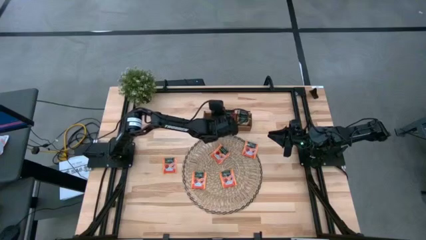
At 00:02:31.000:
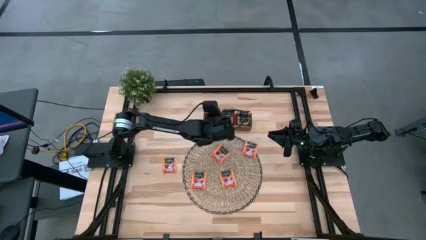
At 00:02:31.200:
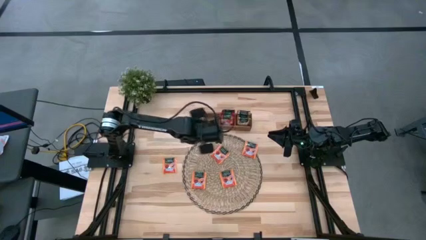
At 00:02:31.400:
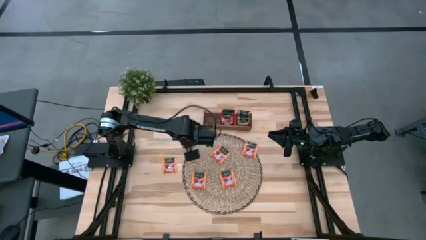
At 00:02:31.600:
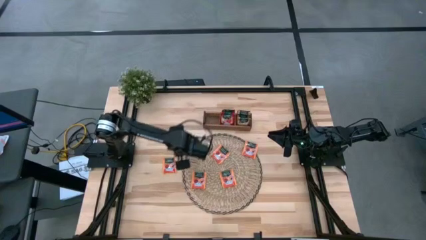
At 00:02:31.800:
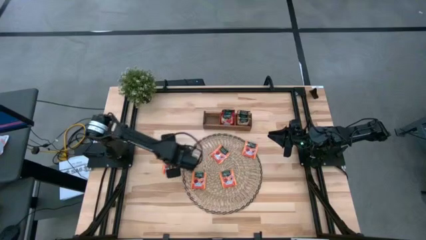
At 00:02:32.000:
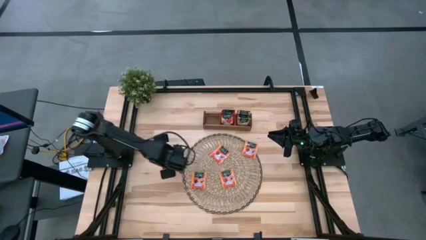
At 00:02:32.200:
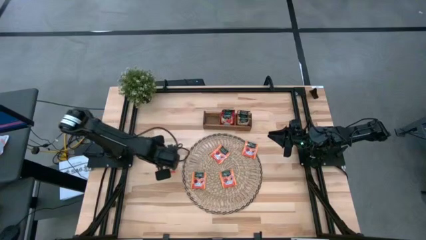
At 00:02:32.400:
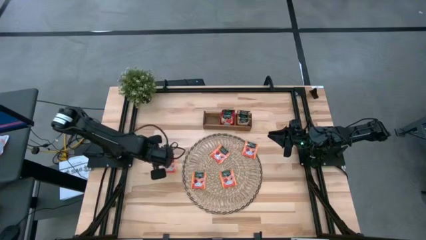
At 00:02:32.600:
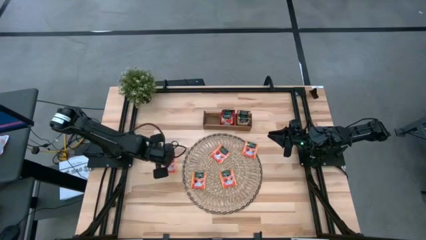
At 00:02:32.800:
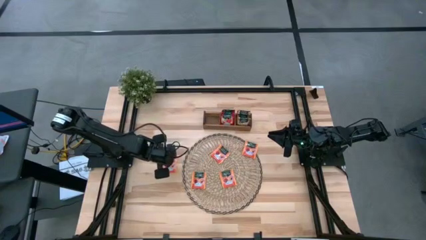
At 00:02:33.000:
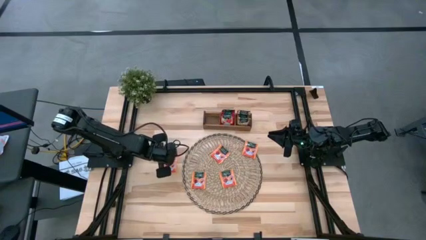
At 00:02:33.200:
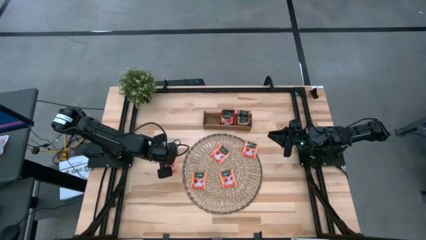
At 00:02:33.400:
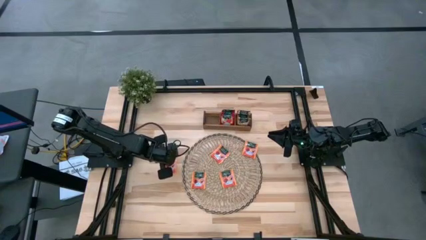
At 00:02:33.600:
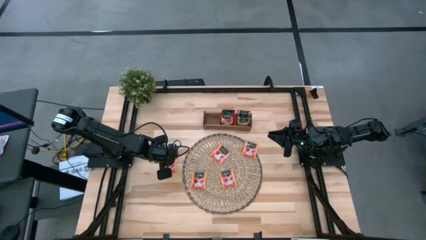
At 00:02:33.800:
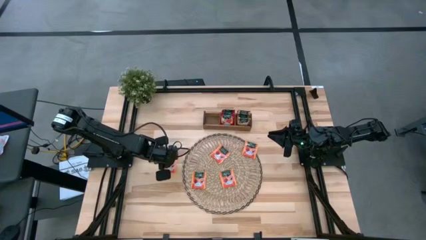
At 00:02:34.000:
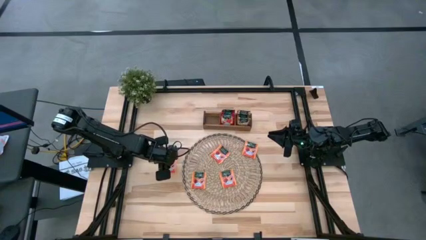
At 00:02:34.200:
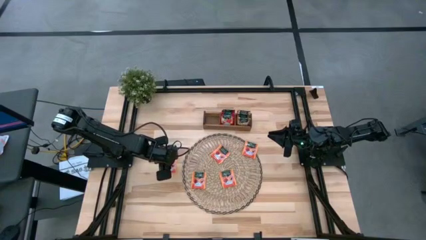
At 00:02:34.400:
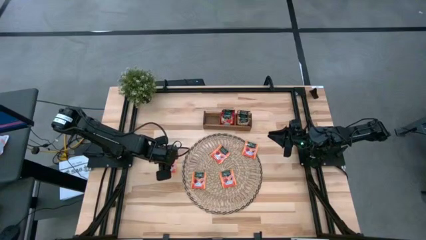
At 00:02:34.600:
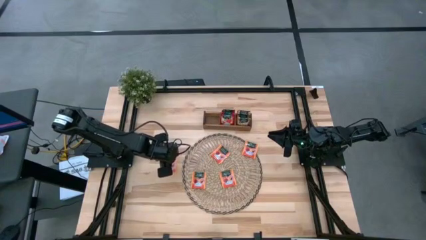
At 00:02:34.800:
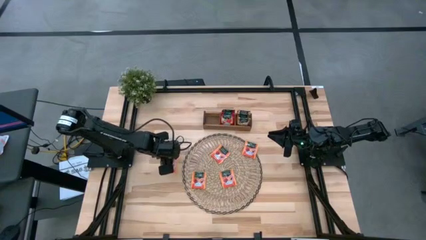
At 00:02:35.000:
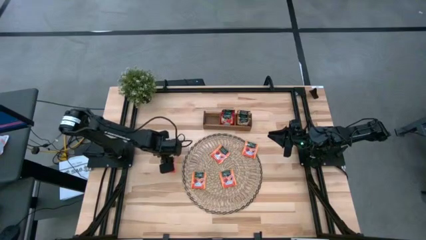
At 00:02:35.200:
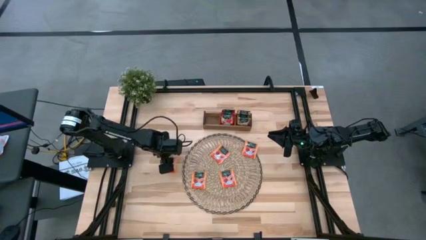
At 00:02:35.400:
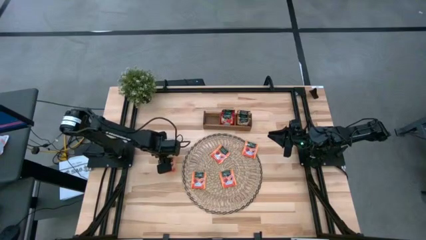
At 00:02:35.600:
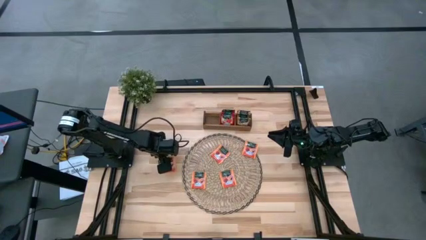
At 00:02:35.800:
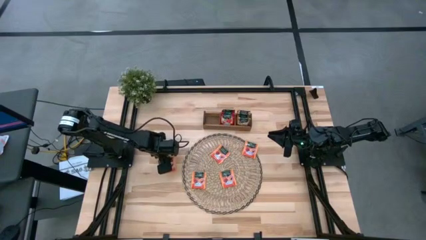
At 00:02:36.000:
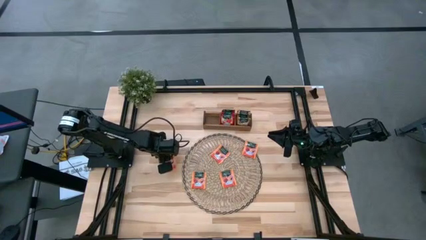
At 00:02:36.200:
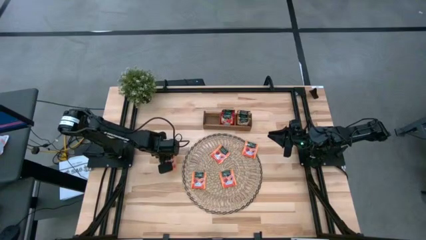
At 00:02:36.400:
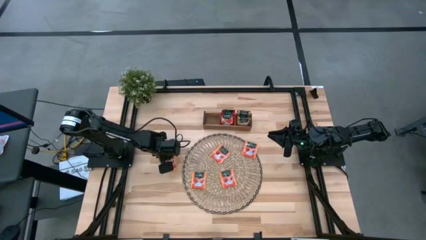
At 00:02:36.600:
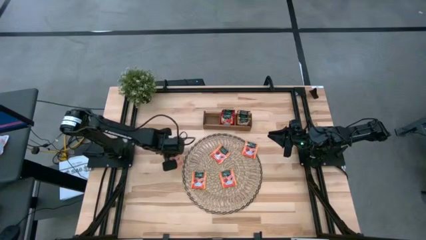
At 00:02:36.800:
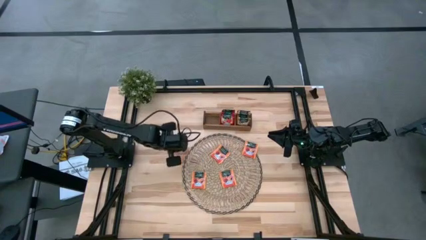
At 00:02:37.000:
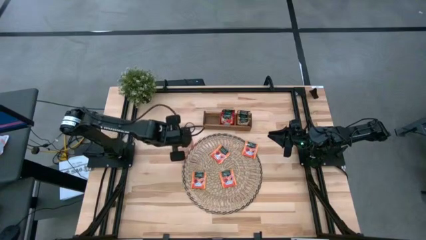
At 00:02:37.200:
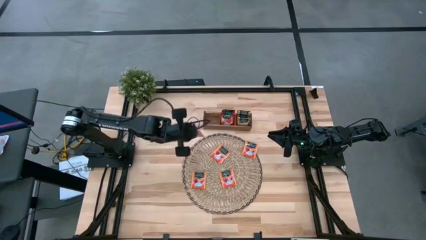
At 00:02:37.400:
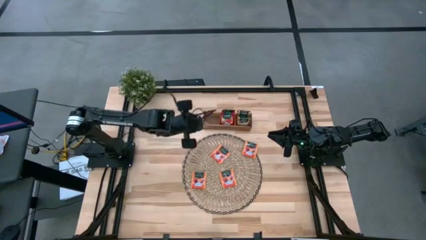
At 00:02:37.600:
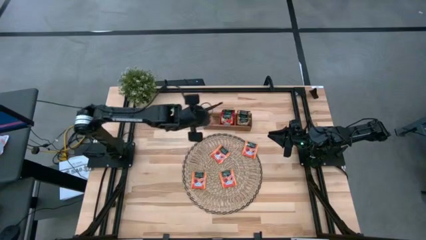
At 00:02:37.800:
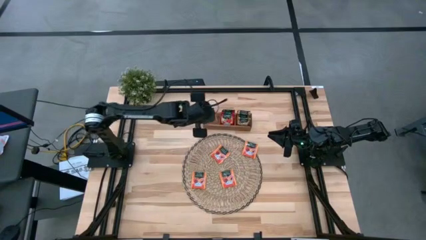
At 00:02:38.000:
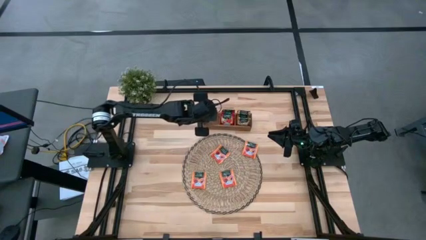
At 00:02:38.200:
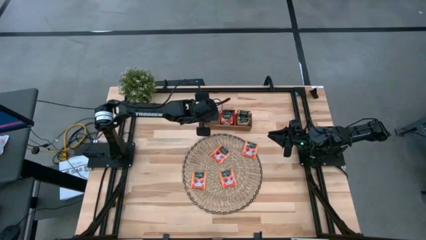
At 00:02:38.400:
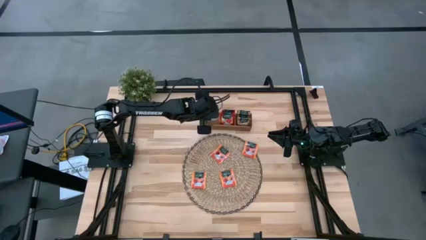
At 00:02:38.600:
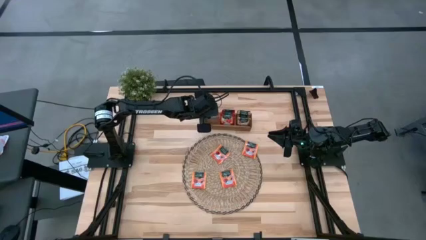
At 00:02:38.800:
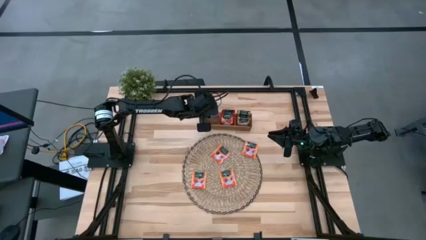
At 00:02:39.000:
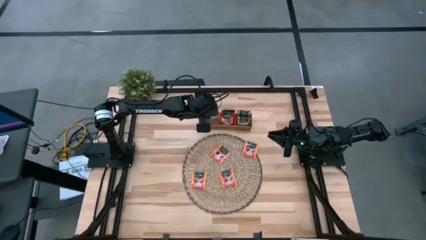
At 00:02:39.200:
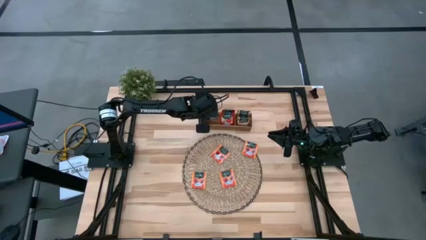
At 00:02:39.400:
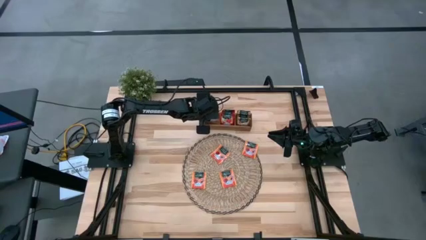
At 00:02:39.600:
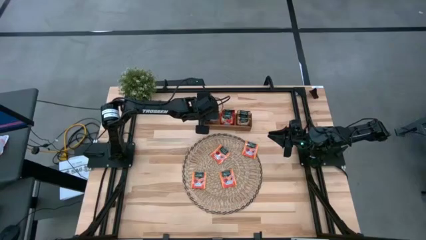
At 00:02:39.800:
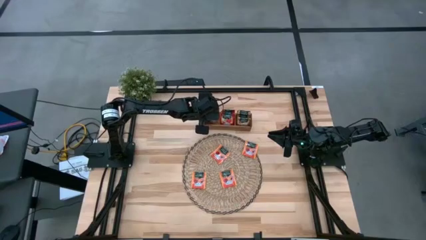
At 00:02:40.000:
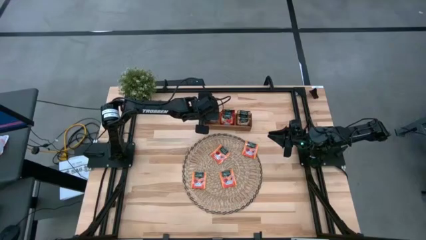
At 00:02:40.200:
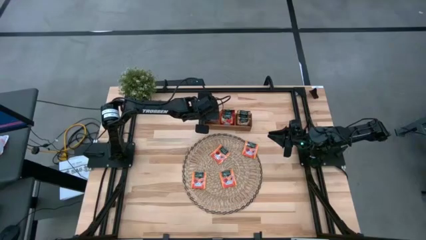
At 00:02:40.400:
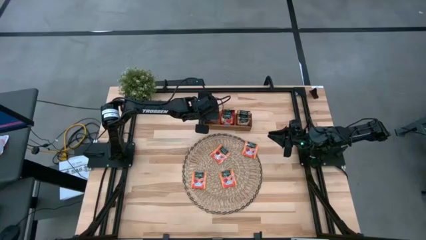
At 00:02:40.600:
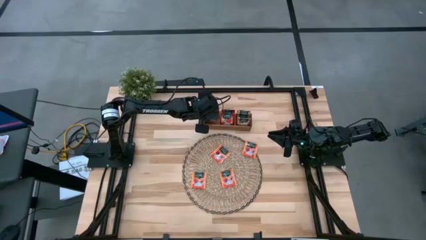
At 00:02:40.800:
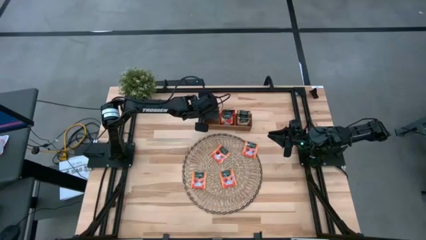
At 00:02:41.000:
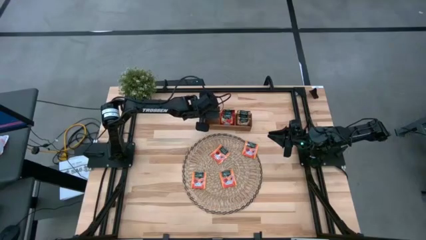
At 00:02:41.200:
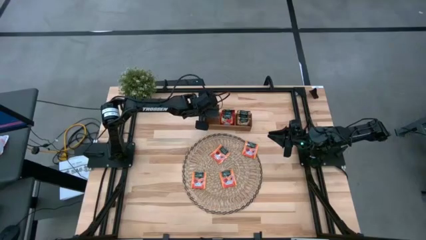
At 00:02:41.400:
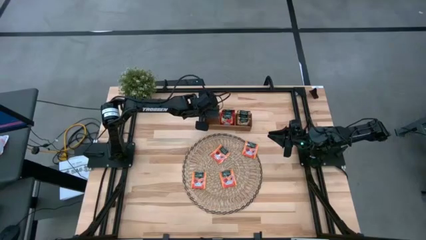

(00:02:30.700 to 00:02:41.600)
Task: Pick & Place Tea
Put the orange tea bag into the left section of the wooden organizer
